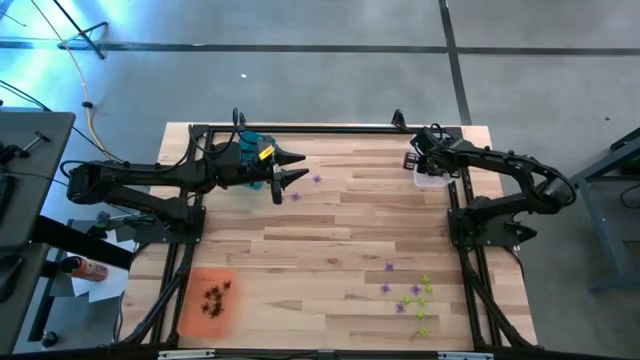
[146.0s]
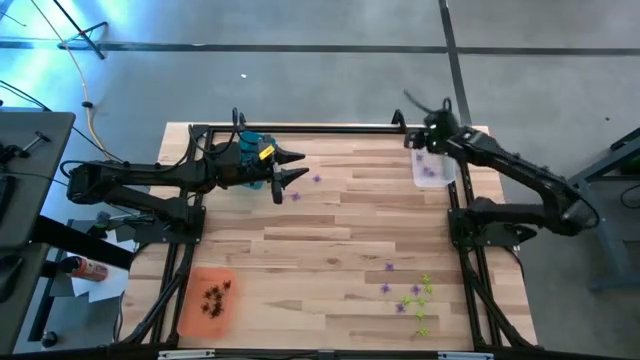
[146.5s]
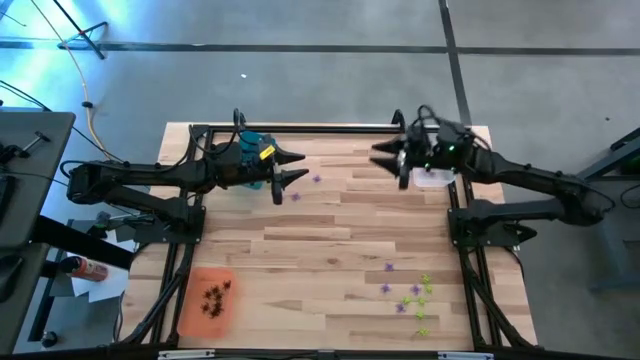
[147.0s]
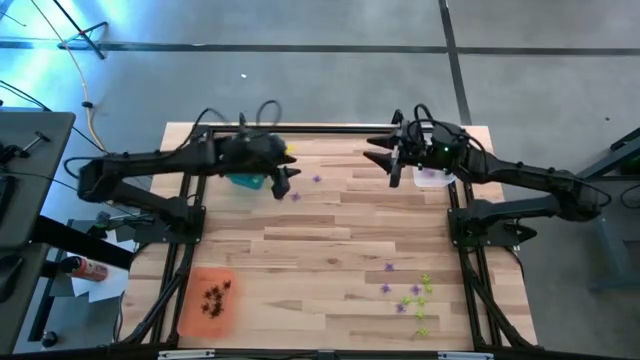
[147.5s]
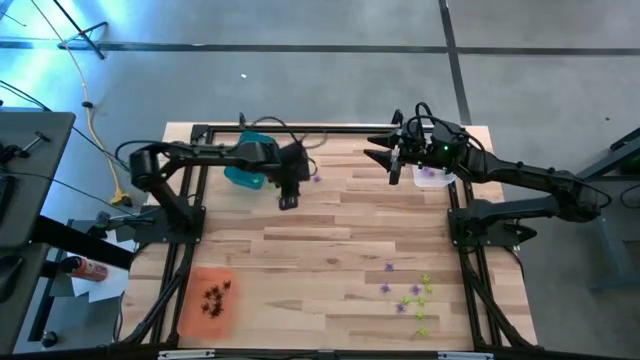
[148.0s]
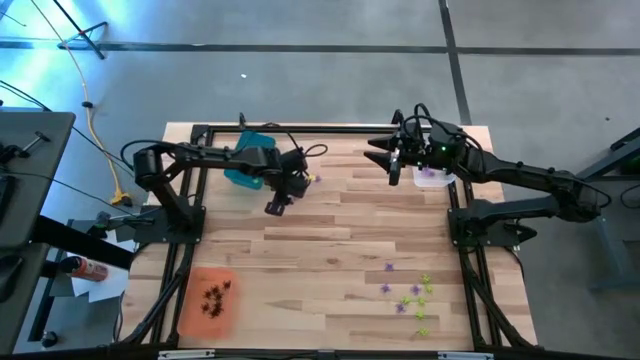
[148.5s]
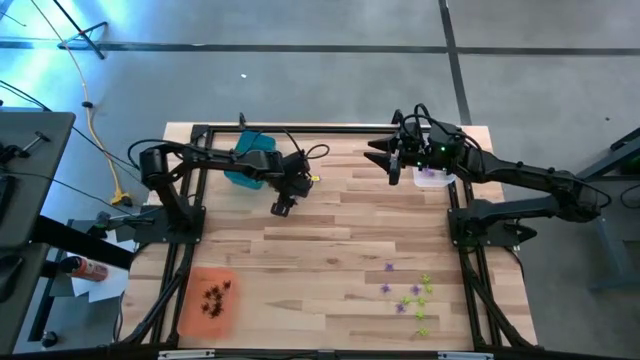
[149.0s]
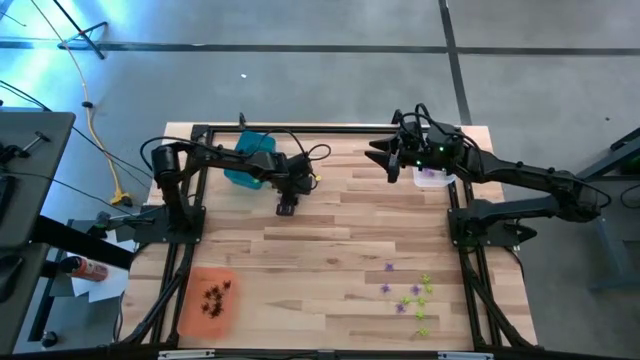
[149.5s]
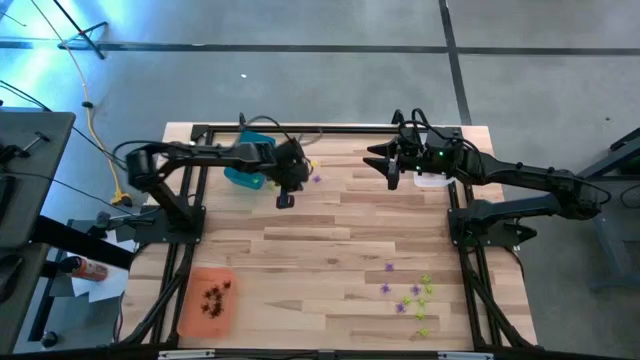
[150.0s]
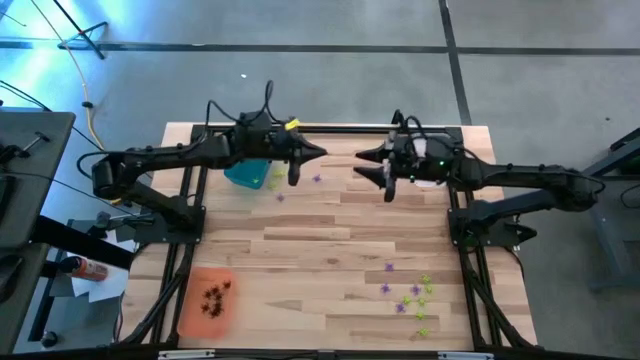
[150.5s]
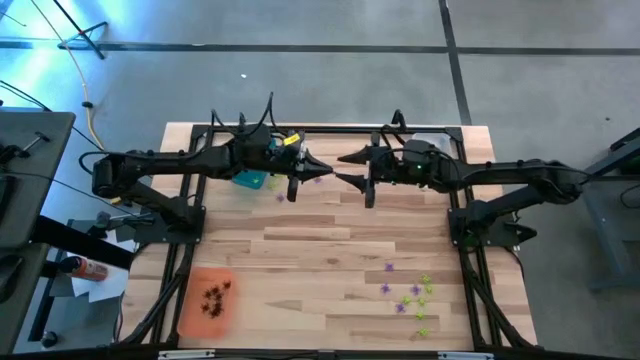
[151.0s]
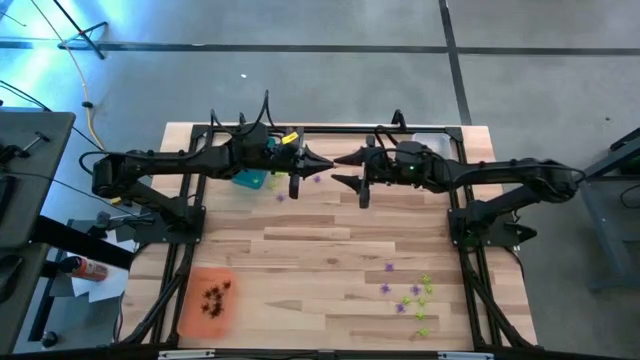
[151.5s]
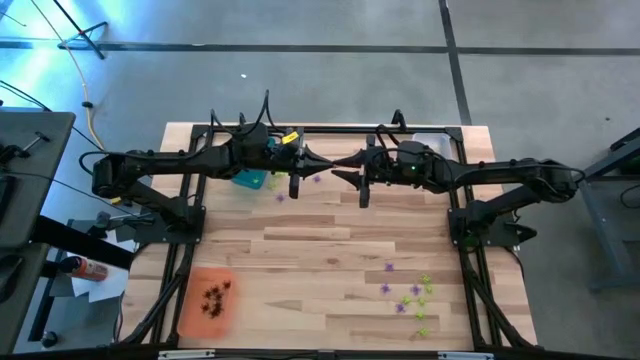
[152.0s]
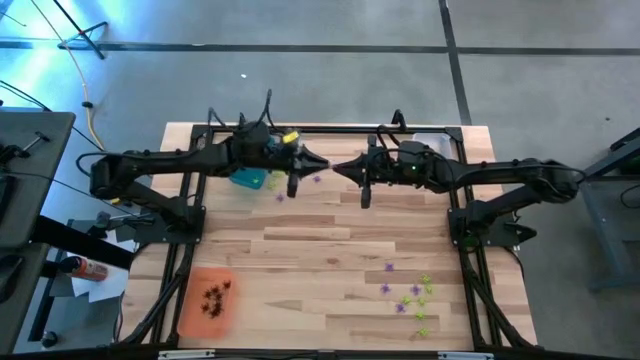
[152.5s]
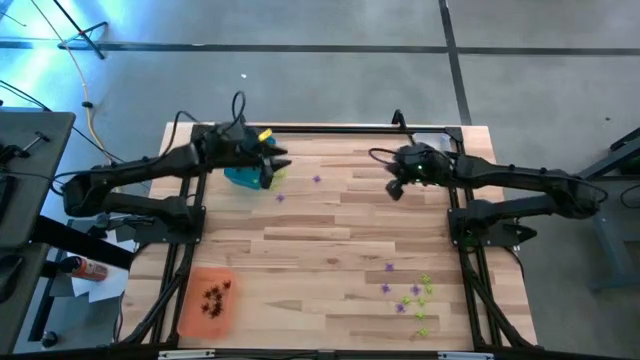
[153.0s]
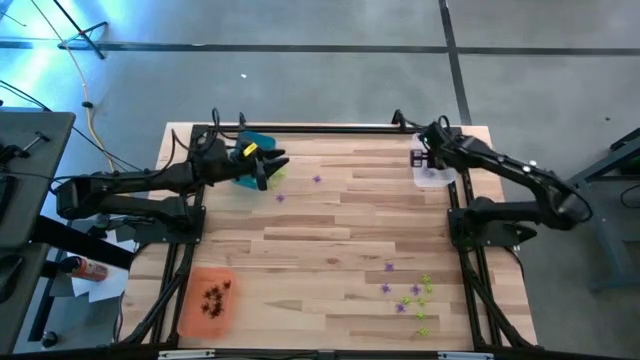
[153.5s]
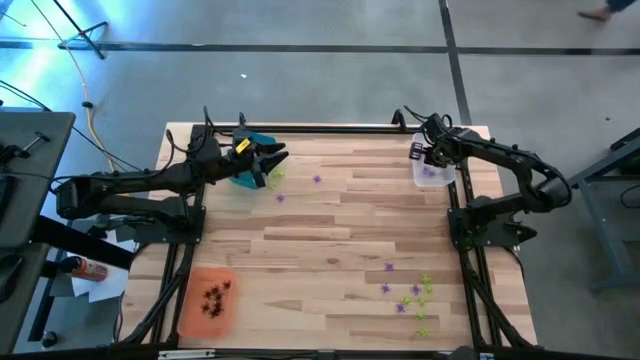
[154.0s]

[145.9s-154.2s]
Task: Sort Halloween decoration
Put the purple spider toy into the transparent bin

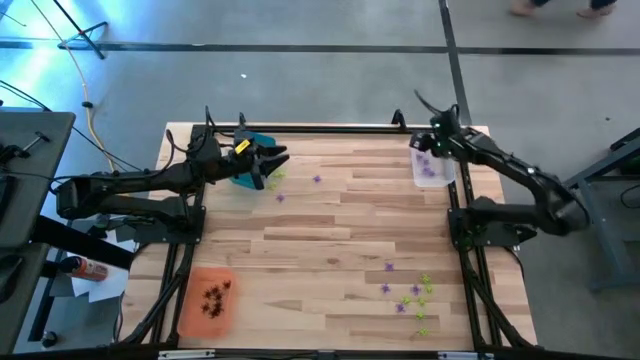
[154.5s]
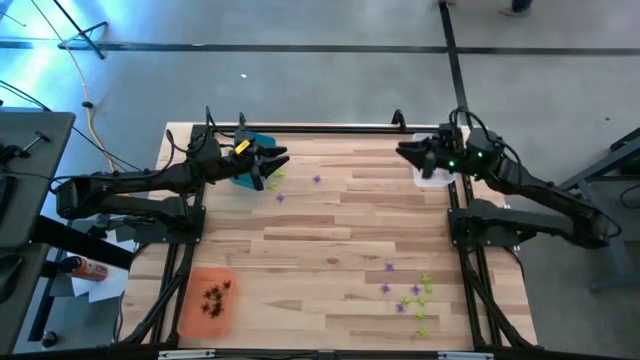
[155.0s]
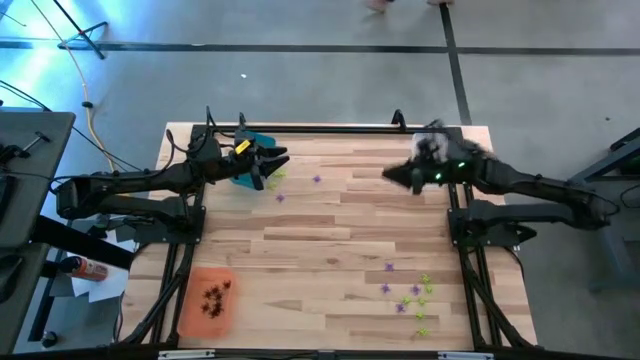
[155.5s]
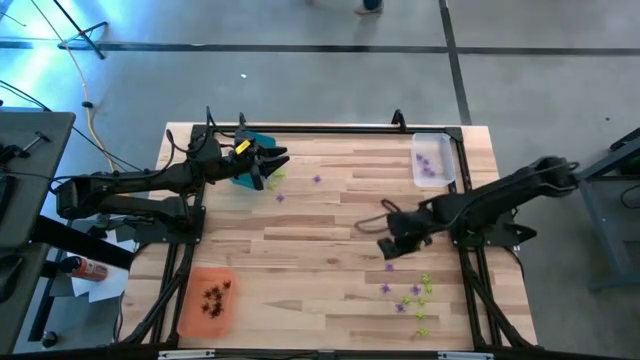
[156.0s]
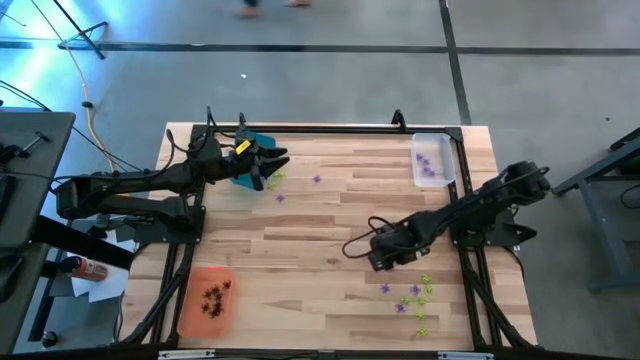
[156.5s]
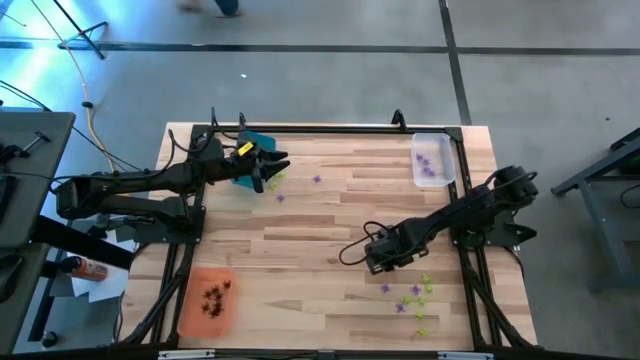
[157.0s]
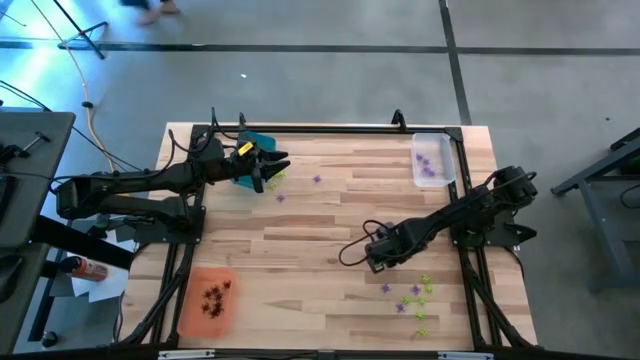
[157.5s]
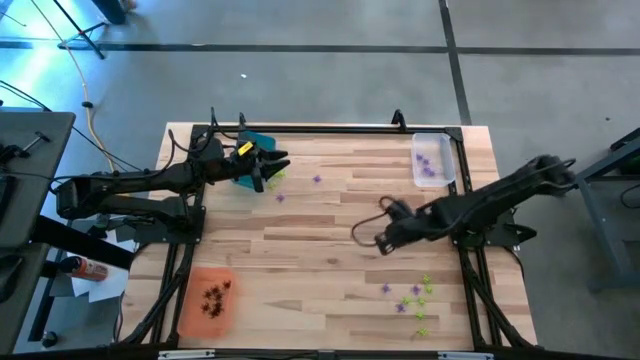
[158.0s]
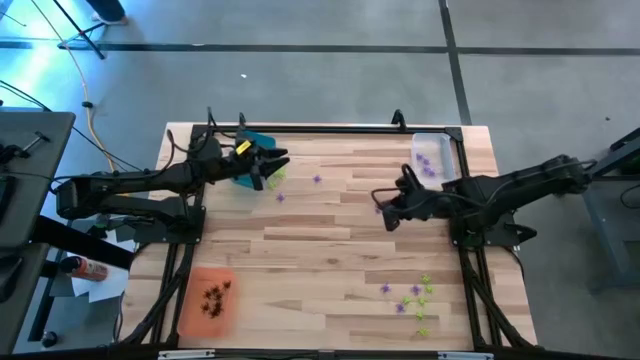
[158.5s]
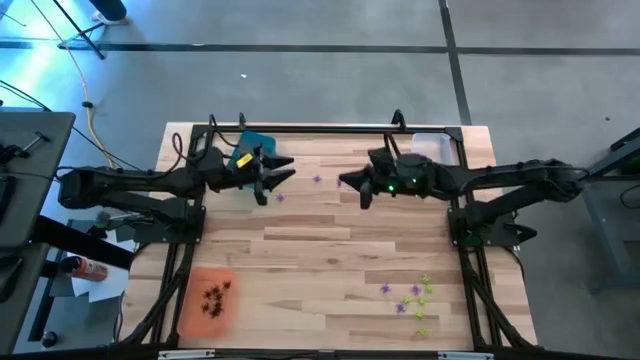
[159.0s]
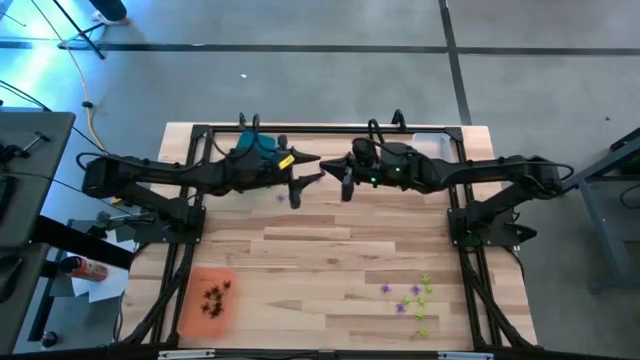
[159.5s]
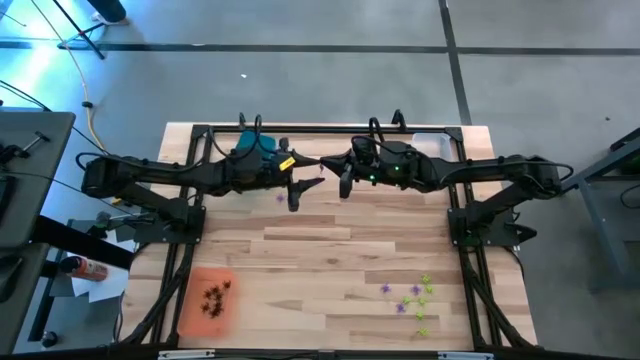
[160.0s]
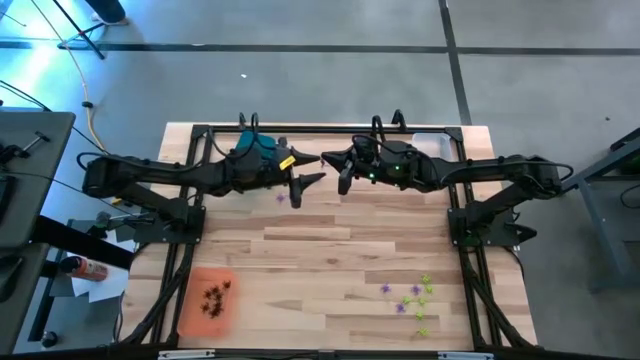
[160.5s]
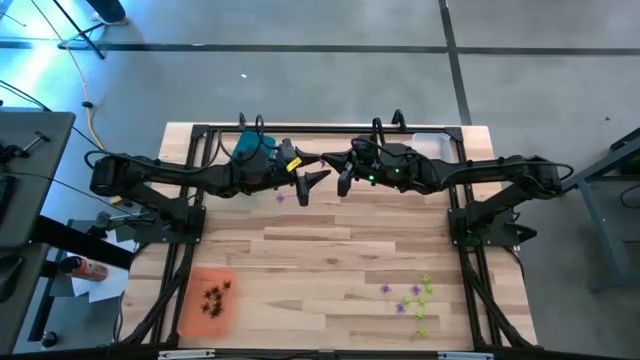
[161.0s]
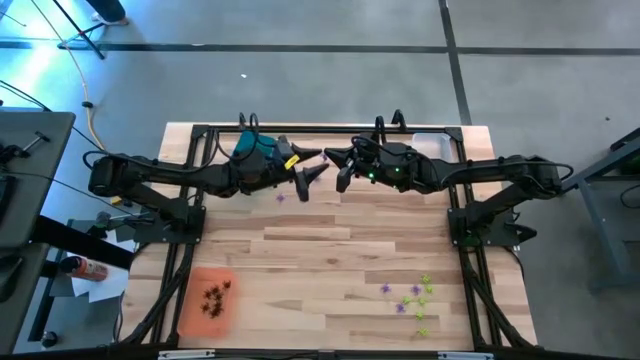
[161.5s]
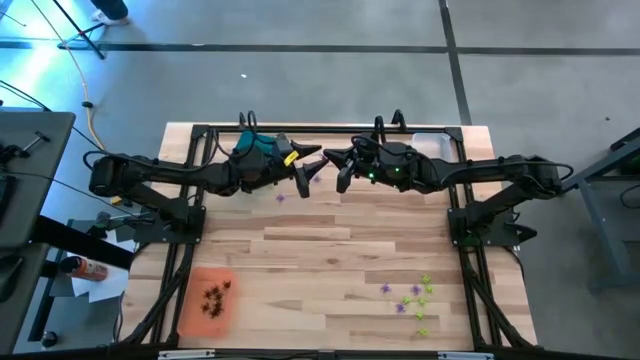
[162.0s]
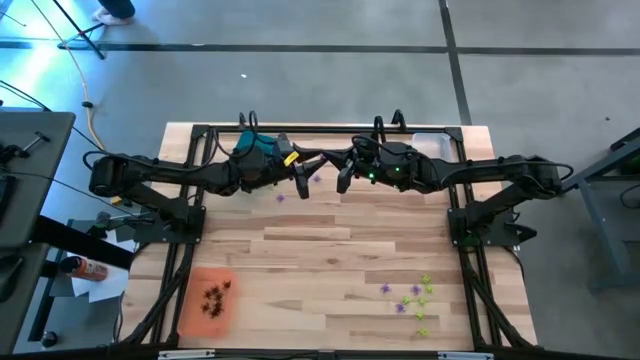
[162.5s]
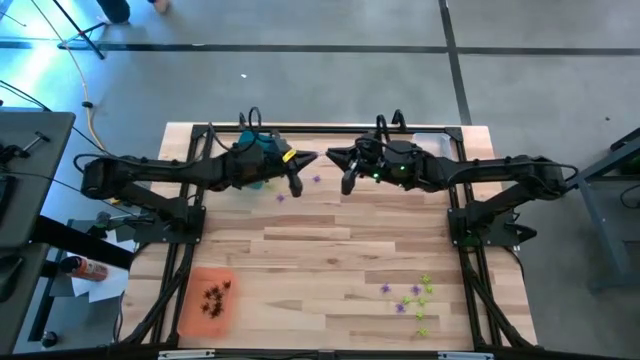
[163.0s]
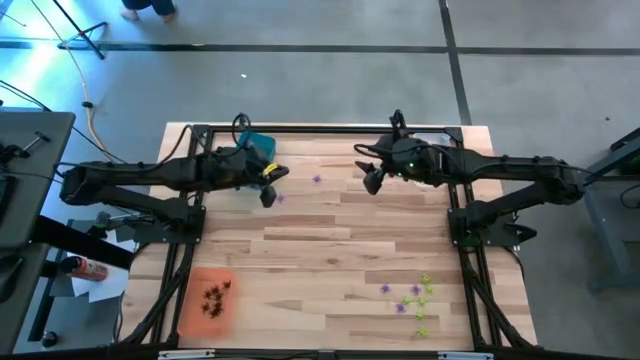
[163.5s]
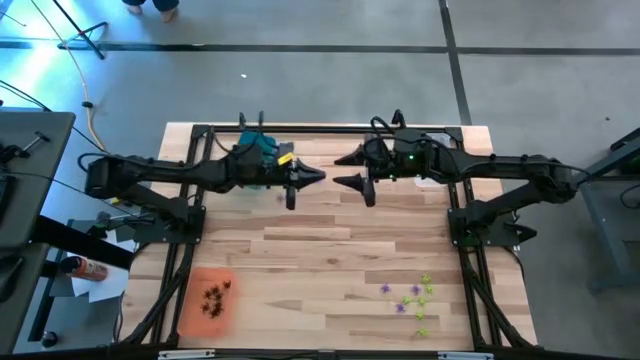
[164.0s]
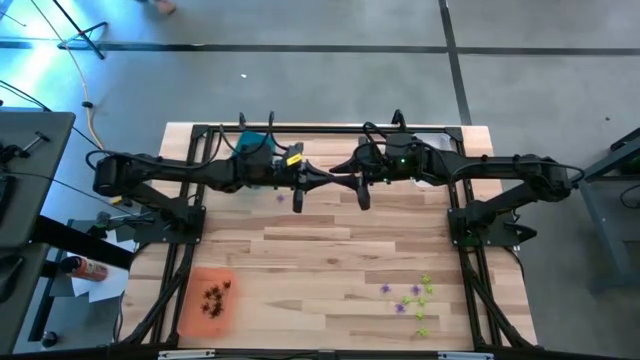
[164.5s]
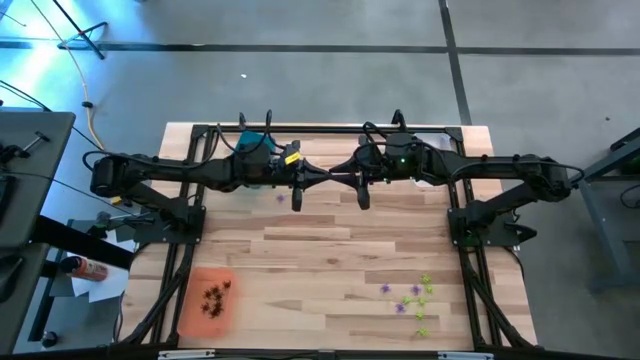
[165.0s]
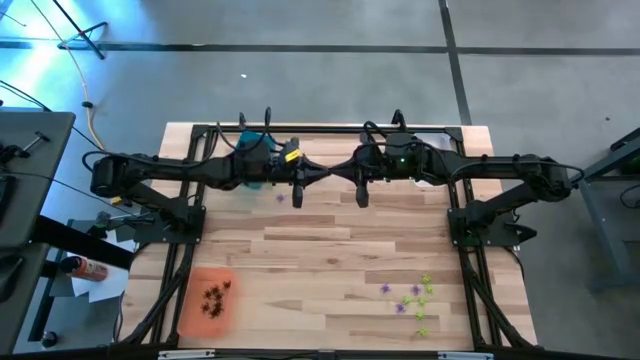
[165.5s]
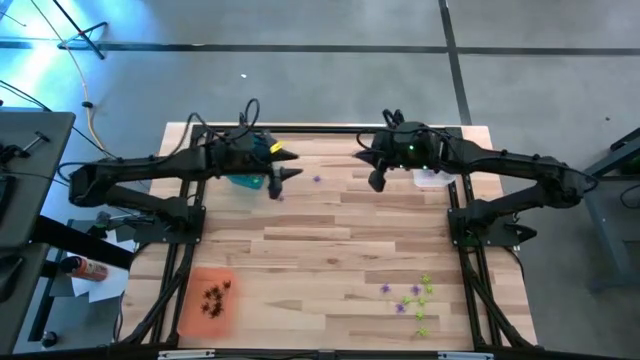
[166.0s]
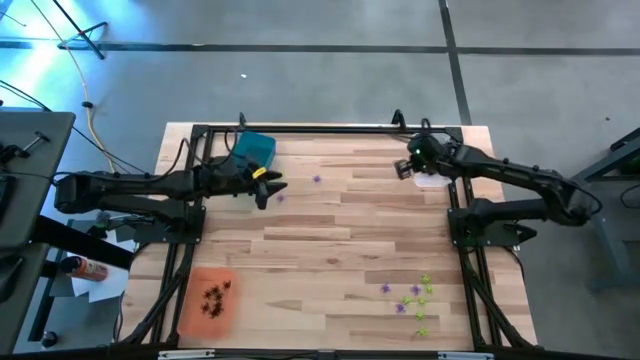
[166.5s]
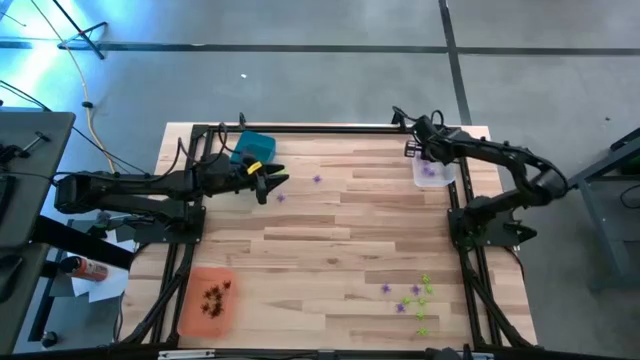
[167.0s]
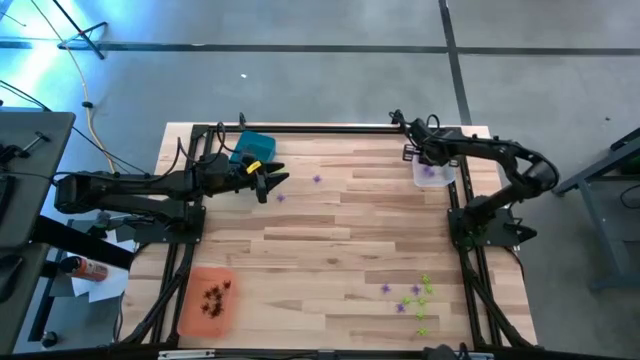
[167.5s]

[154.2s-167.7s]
Put the purple spider toy into the transparent bin
